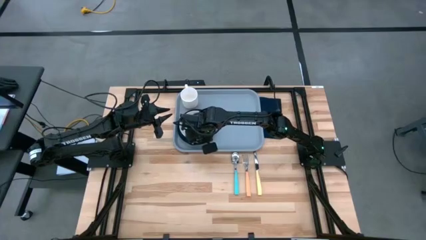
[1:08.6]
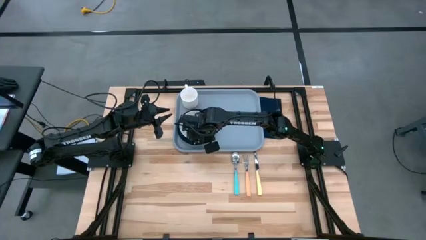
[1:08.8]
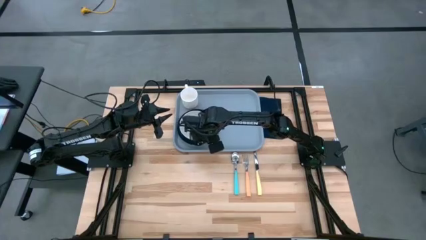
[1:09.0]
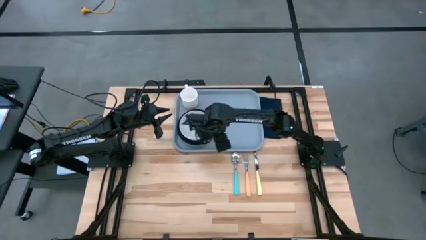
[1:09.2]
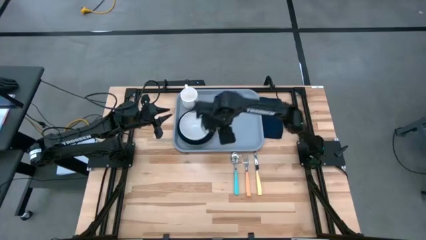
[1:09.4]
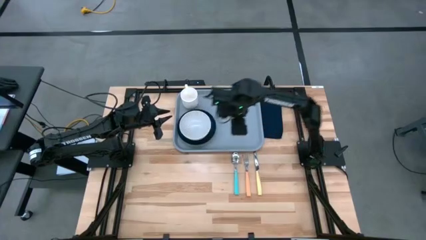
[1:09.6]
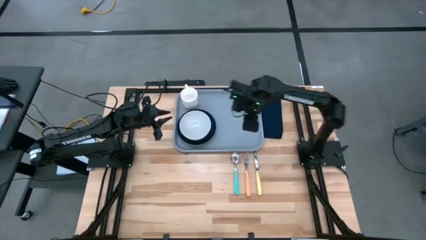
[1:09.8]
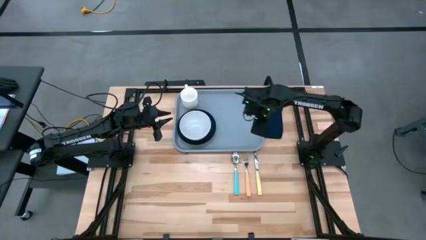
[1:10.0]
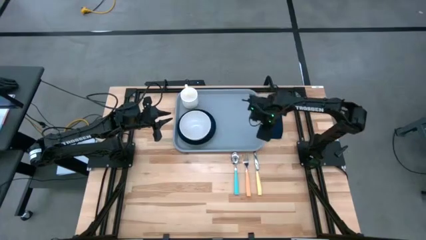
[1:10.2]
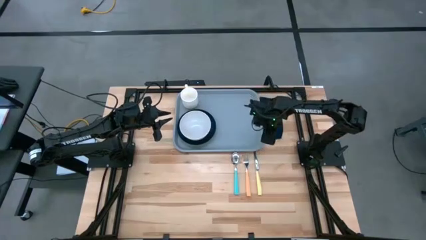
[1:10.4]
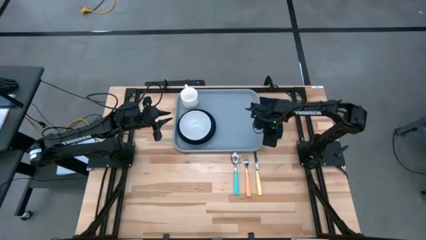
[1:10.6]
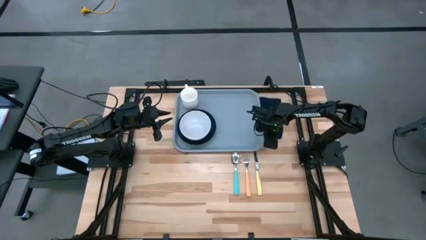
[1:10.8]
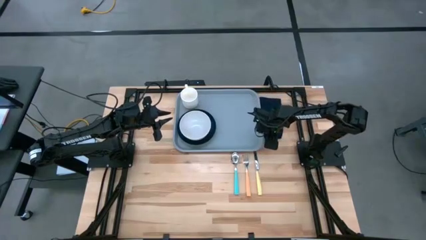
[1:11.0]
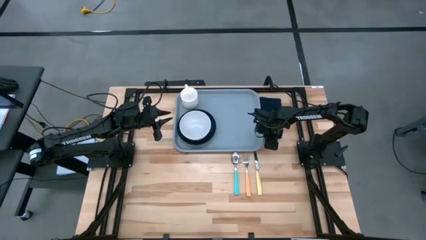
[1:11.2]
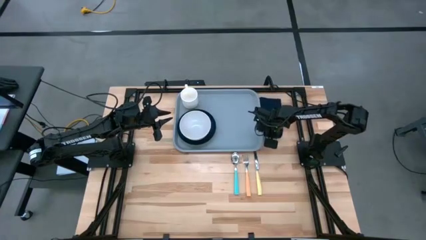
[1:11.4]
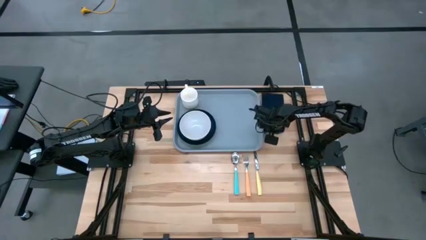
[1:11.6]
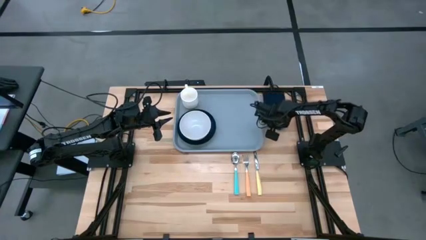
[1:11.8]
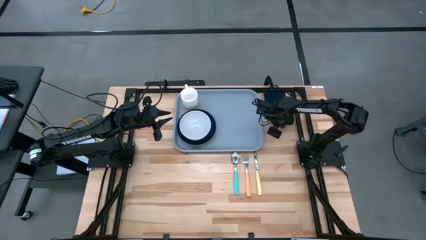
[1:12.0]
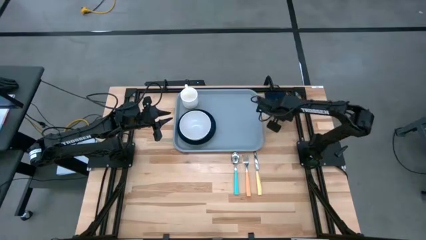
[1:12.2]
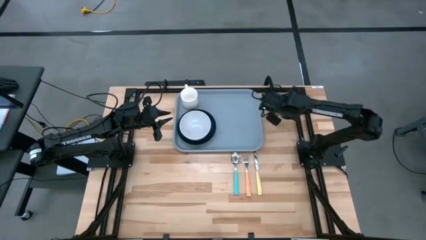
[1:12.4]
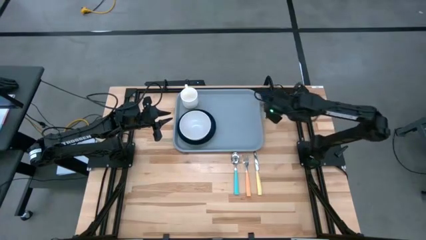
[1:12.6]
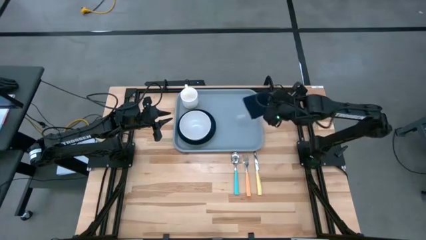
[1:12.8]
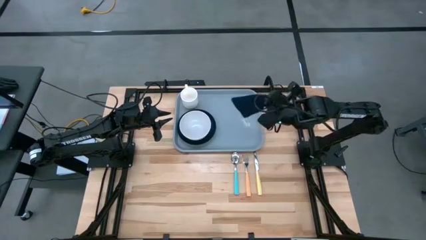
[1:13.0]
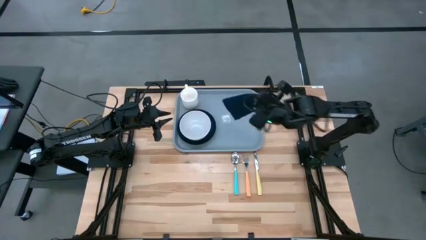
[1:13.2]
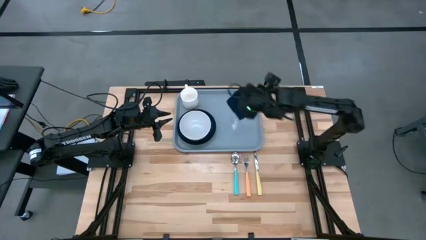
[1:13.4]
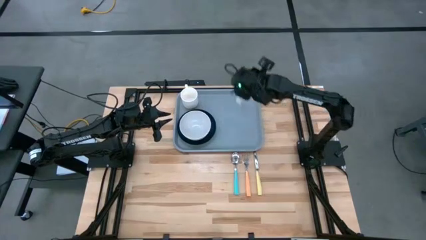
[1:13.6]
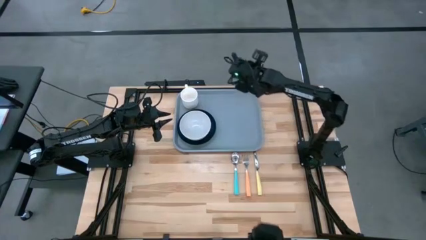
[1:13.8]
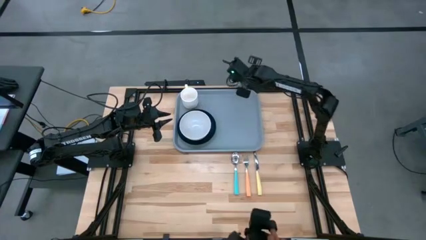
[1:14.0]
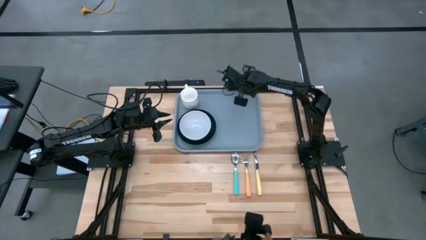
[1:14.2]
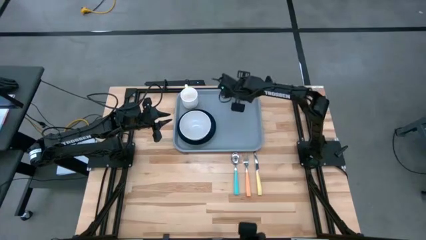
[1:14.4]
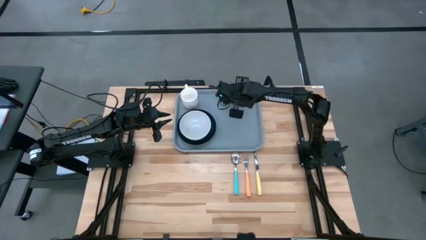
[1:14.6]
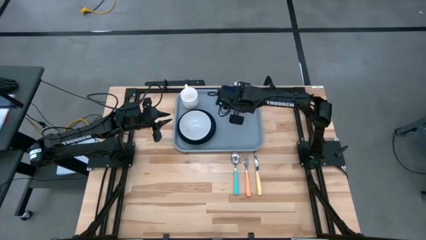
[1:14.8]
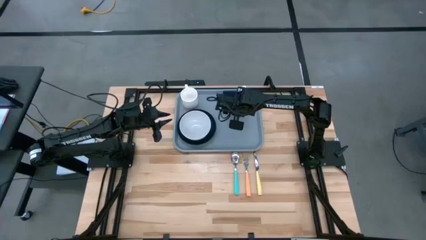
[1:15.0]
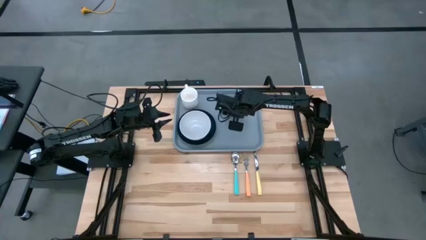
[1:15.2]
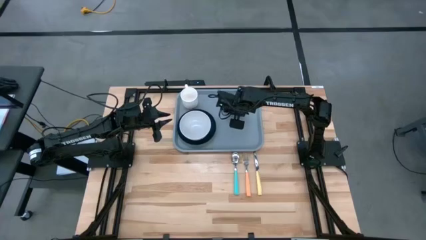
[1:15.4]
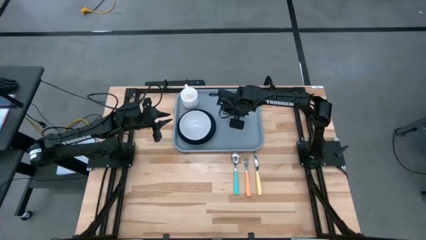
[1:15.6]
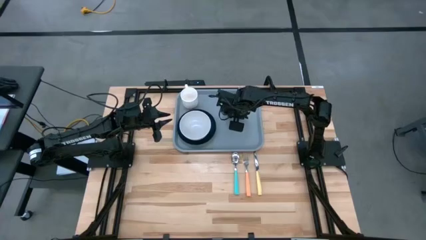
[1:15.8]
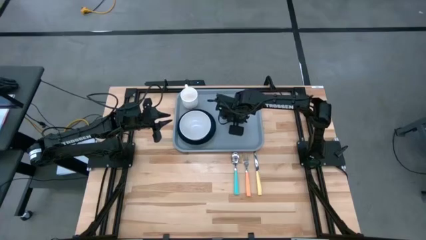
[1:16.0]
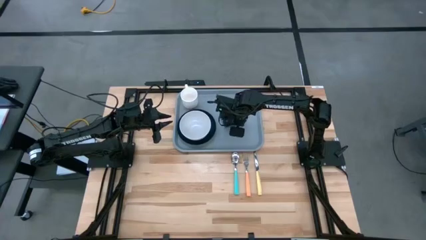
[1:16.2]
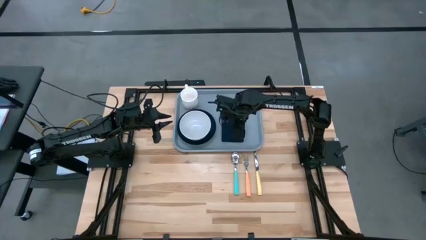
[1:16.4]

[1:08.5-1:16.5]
Task: Set up tray
Put the blue table napkin to the right of the green plate on the gray tray

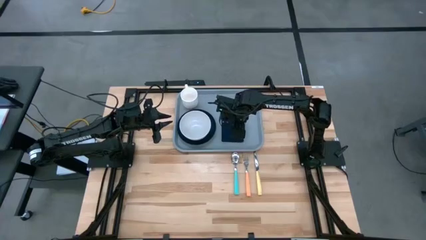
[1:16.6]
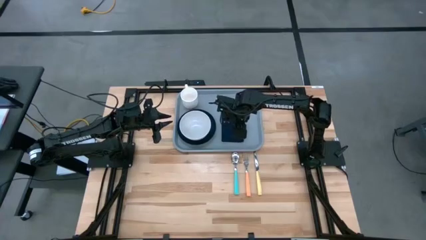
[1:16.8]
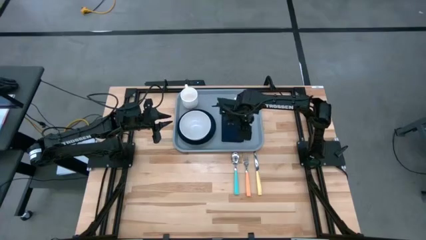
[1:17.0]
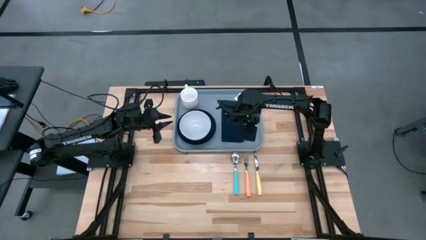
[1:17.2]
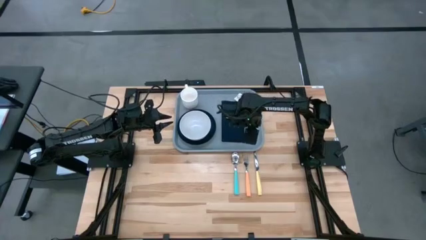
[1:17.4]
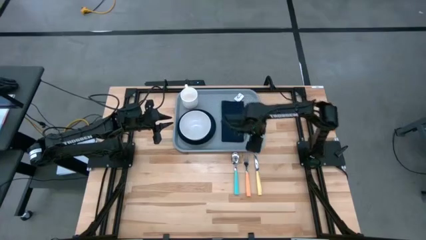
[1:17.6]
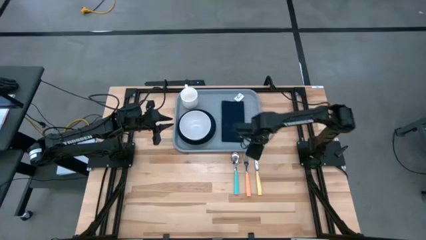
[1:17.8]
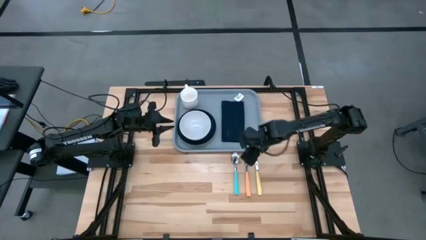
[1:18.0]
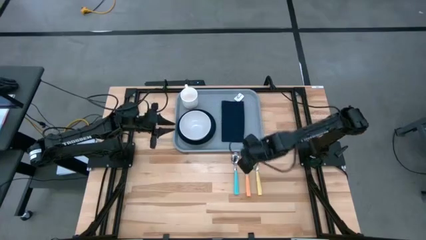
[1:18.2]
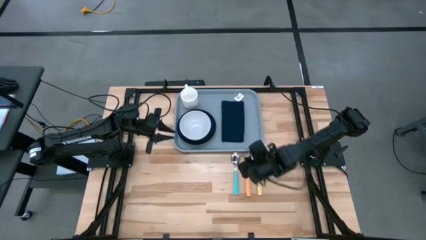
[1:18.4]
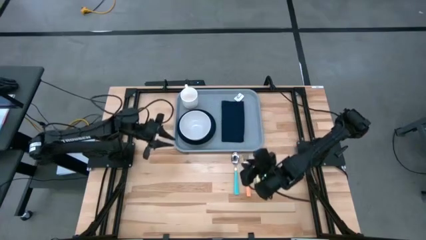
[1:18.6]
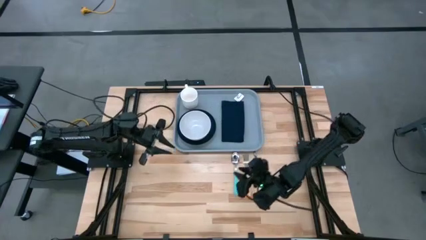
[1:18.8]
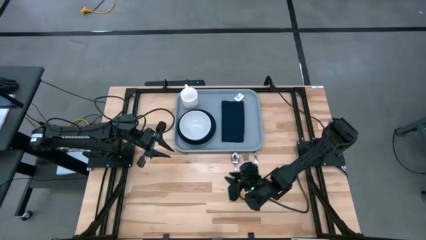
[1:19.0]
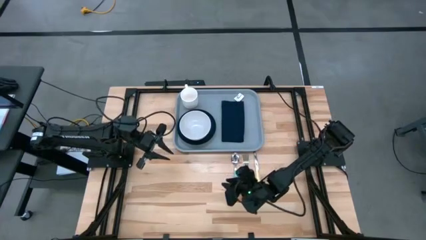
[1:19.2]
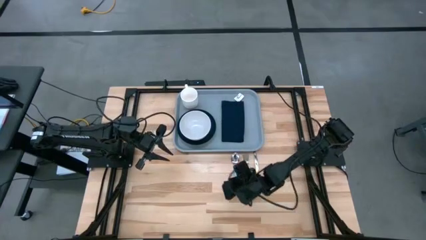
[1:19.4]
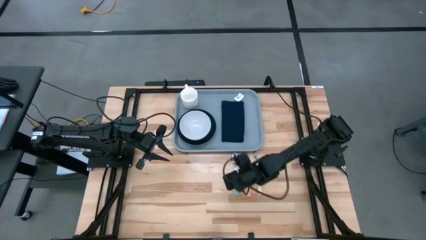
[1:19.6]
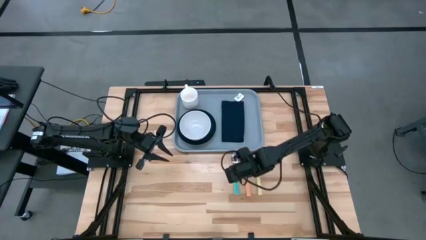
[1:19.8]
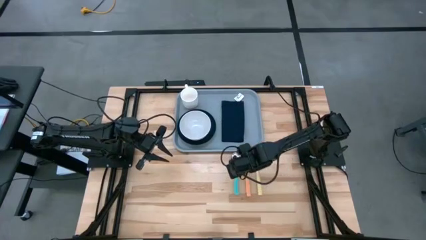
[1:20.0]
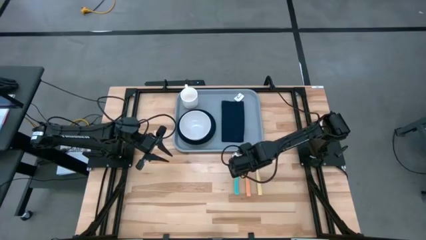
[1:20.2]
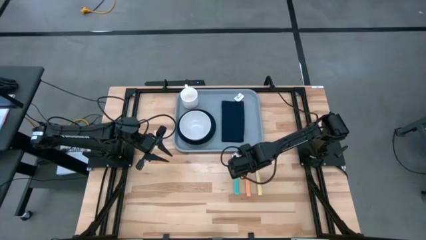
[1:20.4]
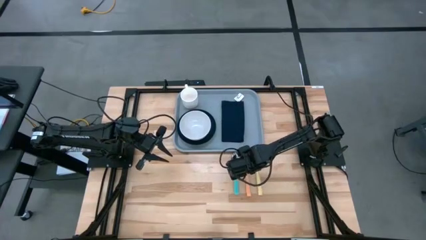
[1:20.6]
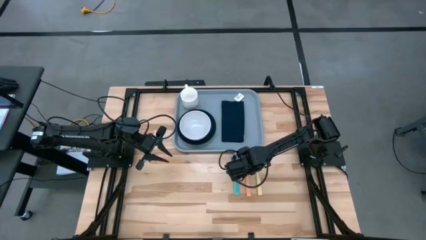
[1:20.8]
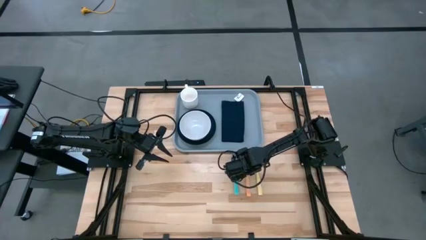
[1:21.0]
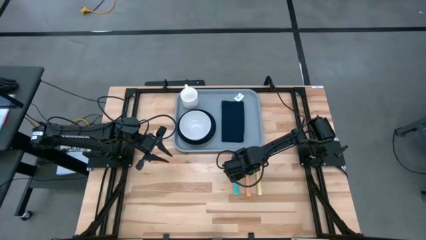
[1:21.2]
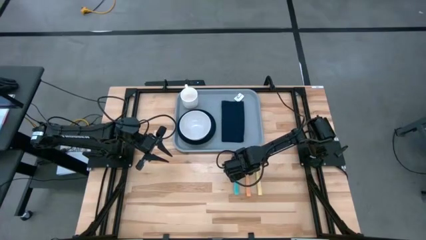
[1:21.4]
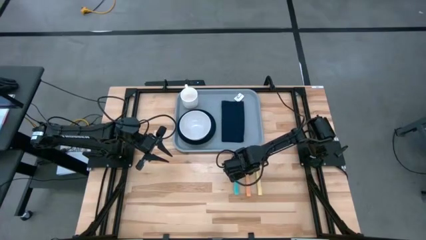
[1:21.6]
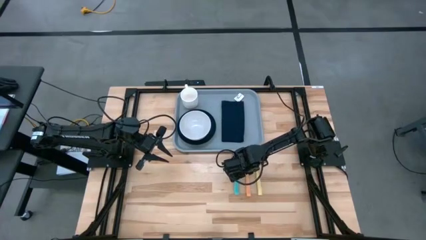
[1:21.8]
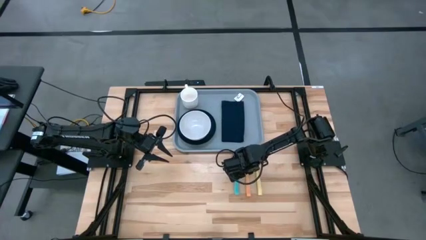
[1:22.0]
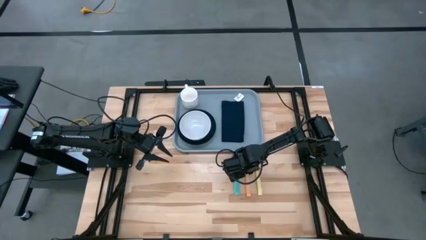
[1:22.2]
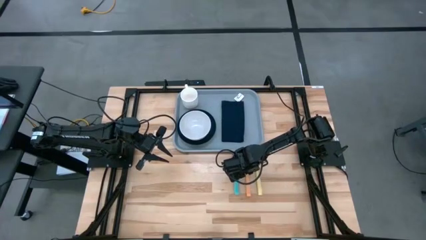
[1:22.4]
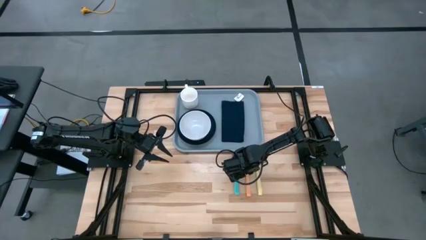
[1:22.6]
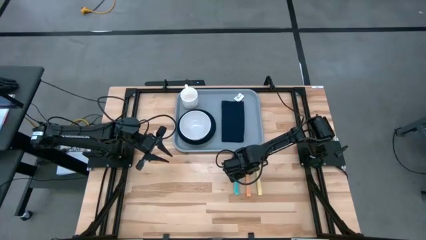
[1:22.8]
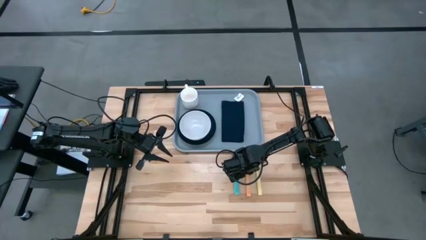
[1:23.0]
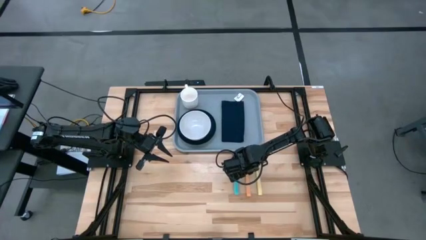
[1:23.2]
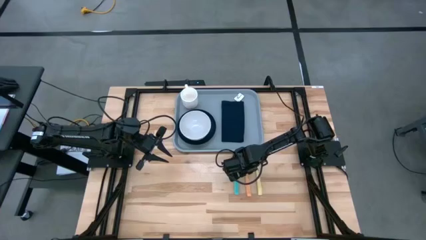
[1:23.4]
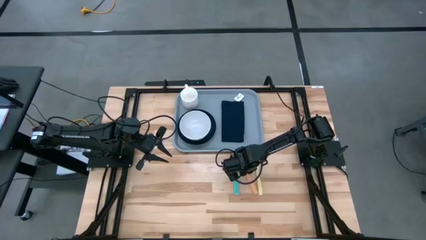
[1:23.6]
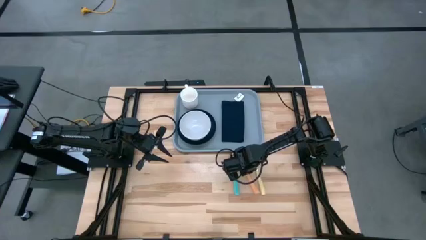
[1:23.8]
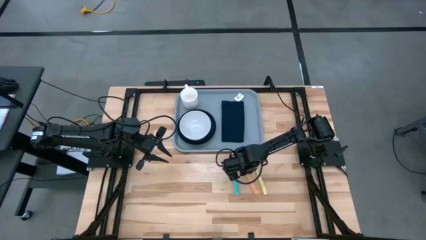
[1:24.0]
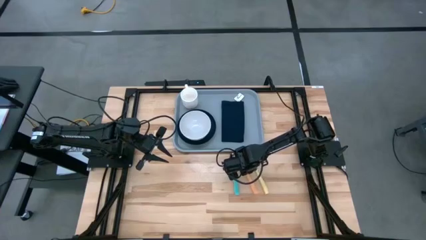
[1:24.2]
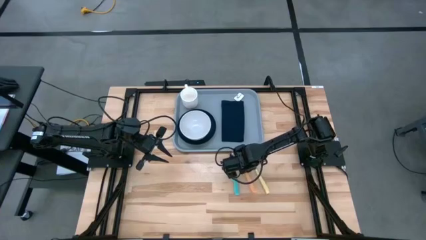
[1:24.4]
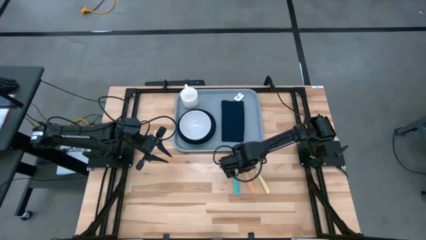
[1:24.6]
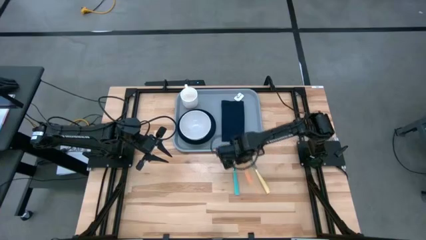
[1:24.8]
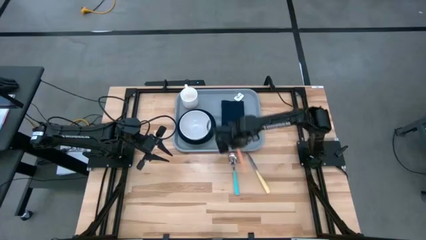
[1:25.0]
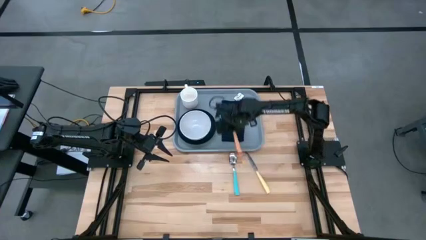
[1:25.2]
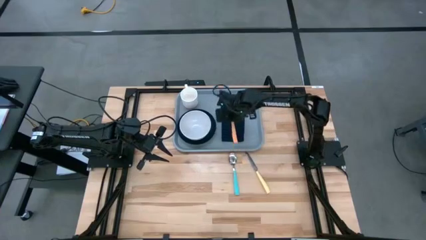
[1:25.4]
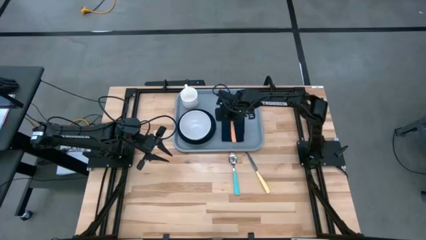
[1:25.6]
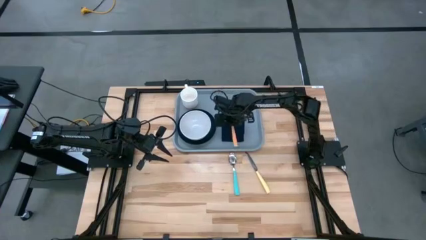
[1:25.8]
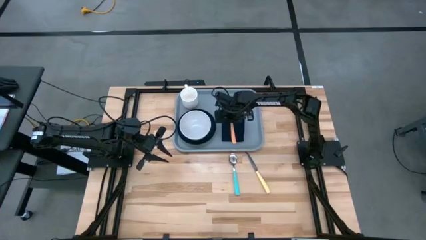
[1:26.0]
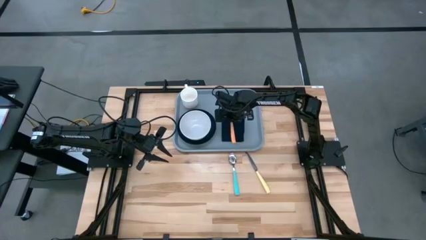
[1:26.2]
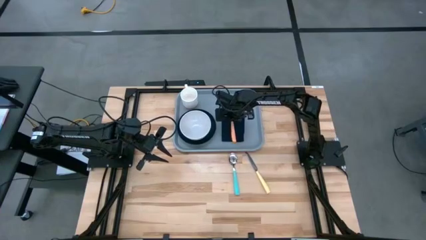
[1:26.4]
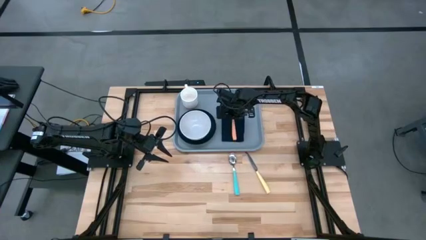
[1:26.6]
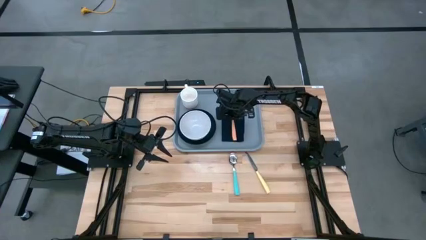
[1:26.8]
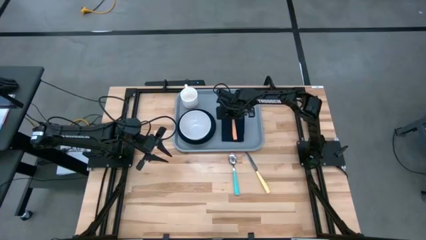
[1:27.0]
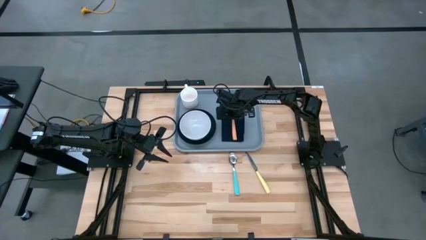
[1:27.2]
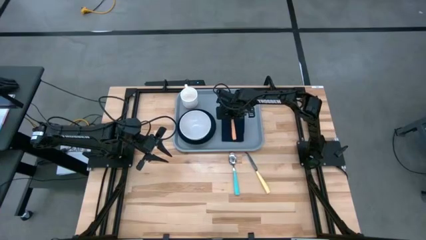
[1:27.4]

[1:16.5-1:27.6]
Put the orange fork on the blue table napkin
